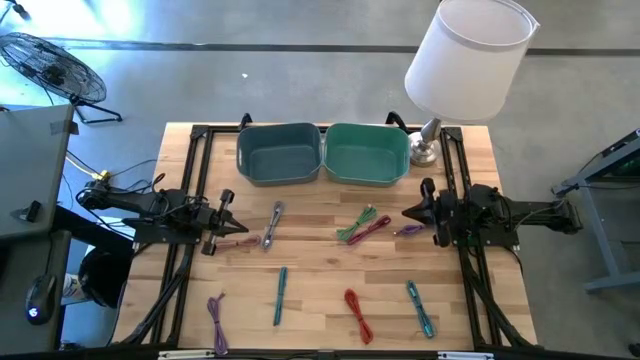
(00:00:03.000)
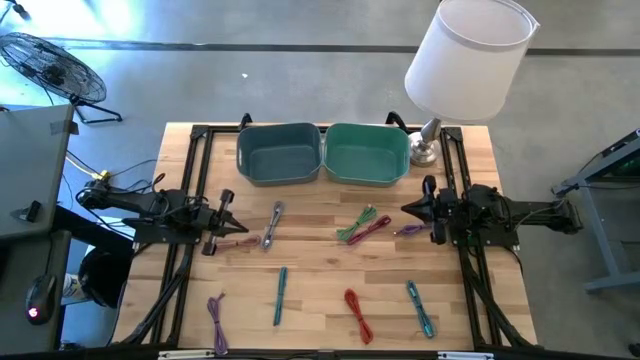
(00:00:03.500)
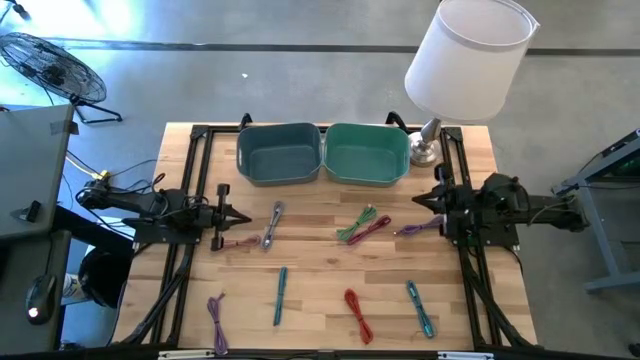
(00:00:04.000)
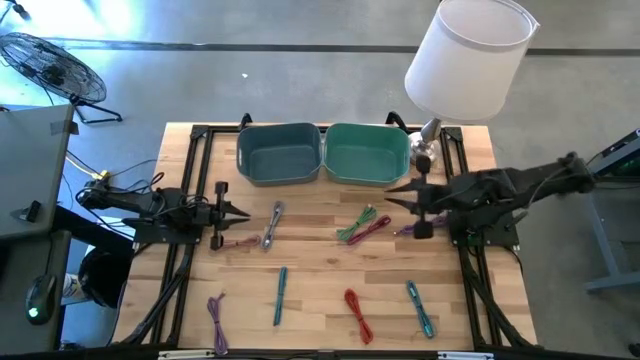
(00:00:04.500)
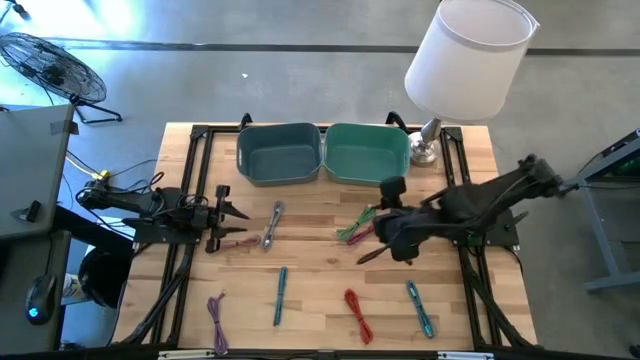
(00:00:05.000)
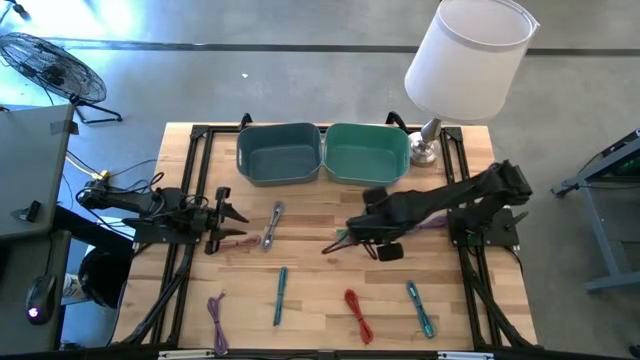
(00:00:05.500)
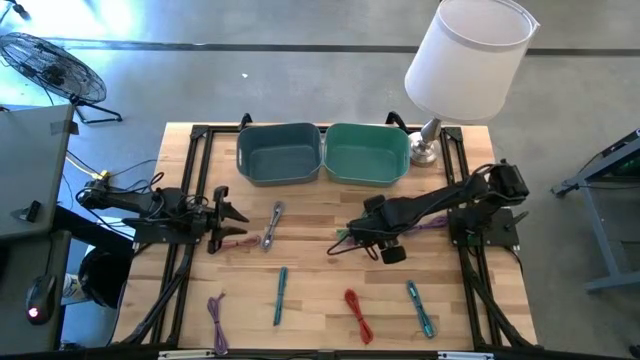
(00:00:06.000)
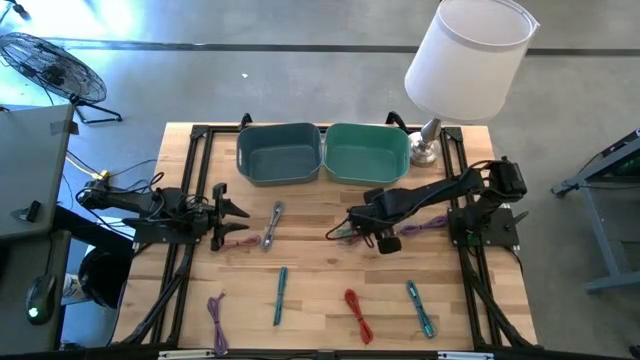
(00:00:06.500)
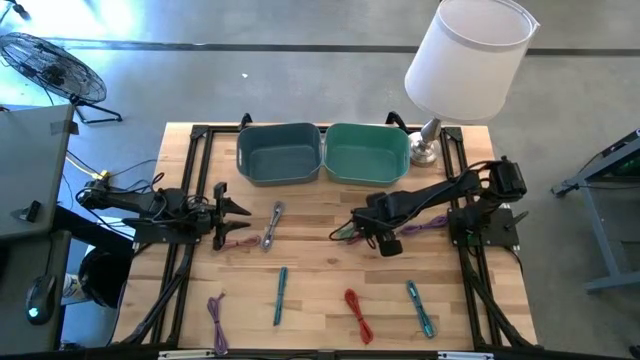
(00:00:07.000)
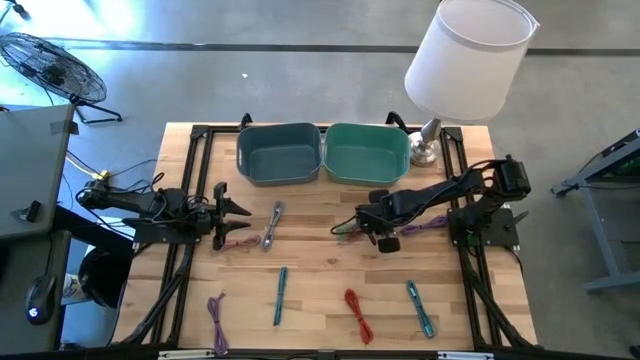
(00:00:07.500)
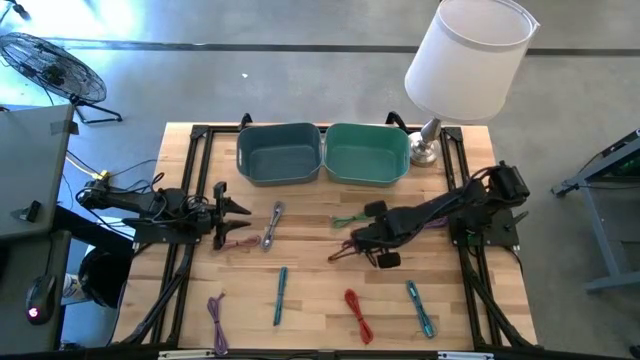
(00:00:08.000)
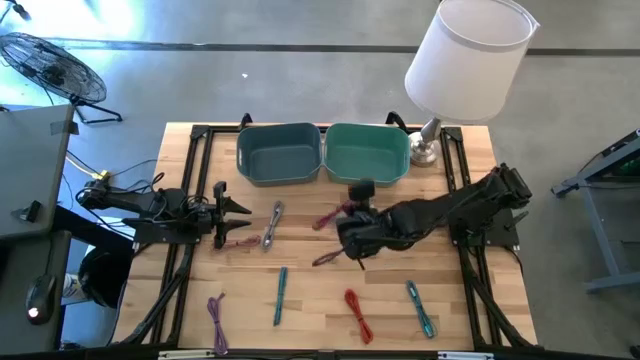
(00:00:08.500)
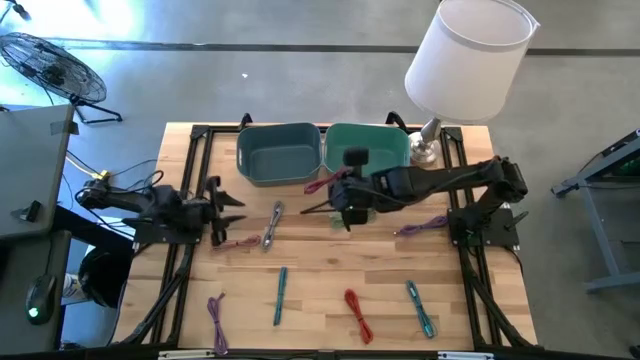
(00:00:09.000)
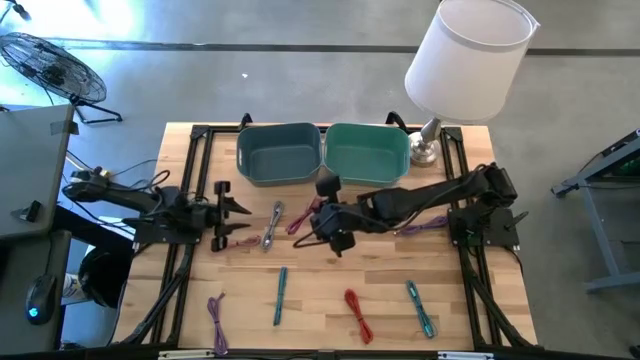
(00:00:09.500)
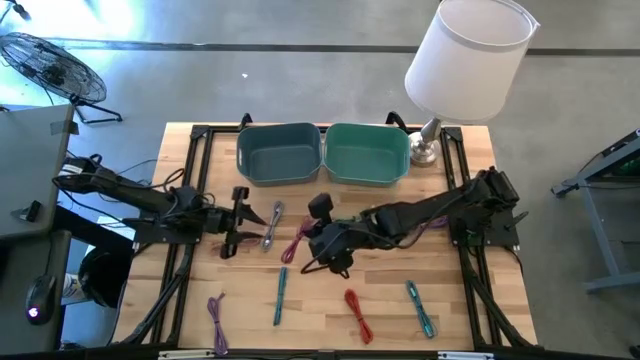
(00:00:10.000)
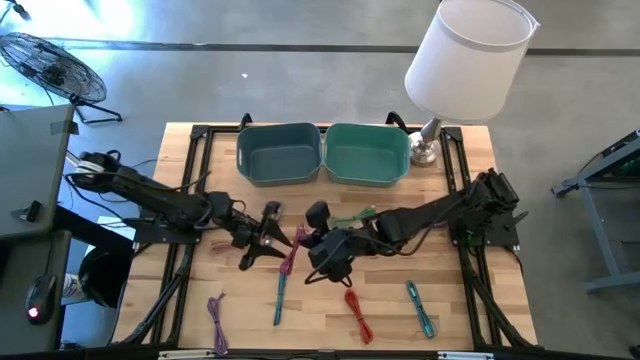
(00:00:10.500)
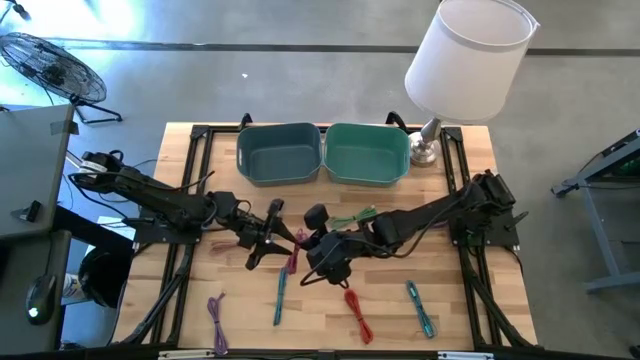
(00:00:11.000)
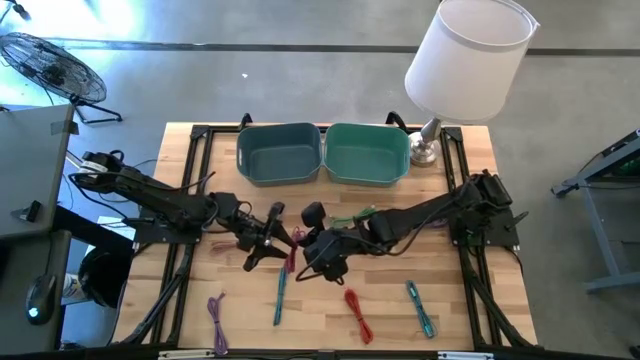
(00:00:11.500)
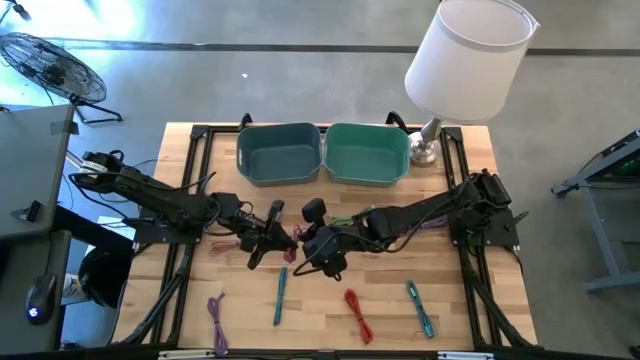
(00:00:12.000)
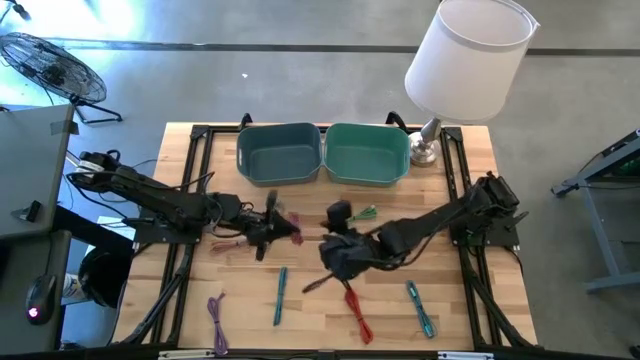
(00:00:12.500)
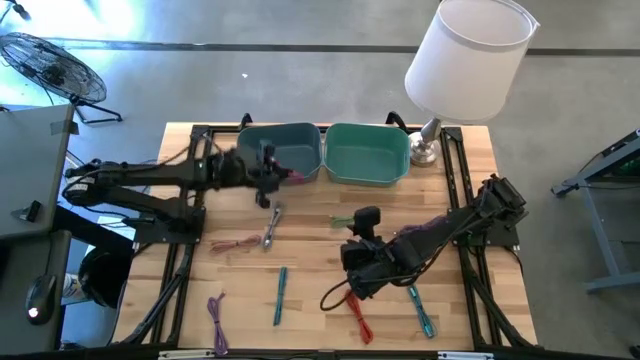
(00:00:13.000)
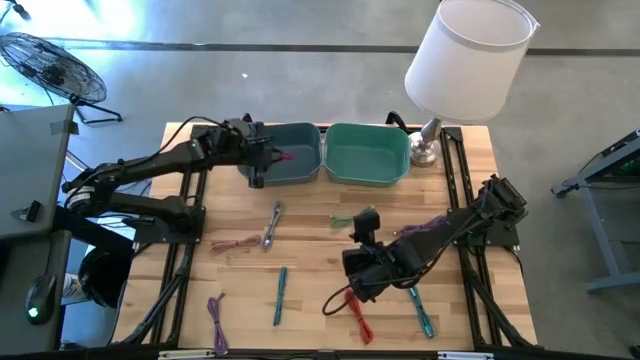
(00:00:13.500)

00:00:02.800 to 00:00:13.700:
Task: Pick & Place USB Port
Put the pink patterned USB cable into the blue bin

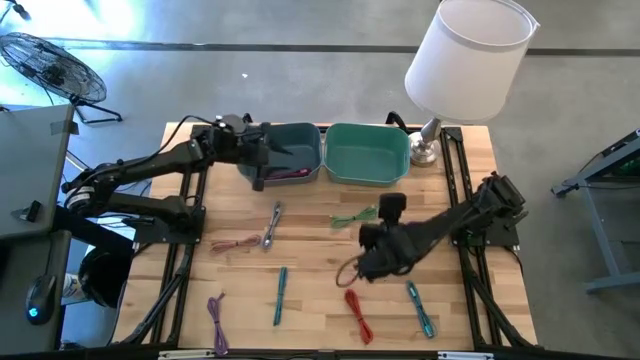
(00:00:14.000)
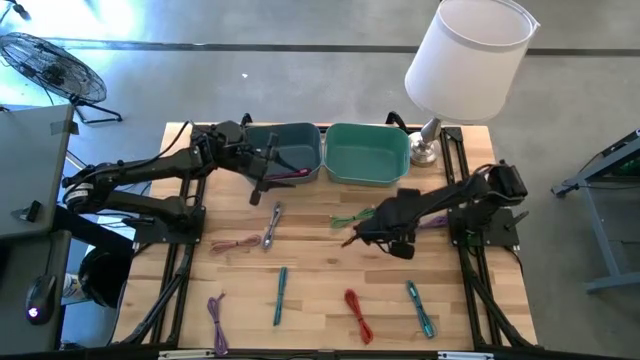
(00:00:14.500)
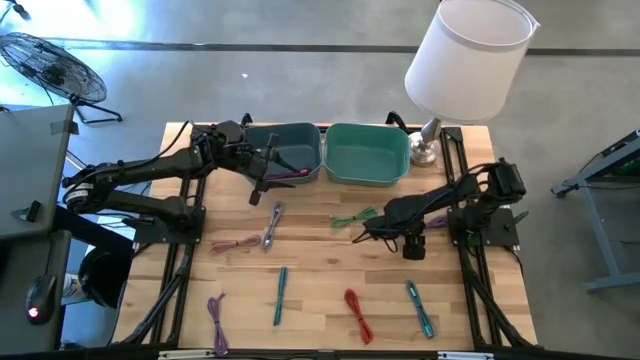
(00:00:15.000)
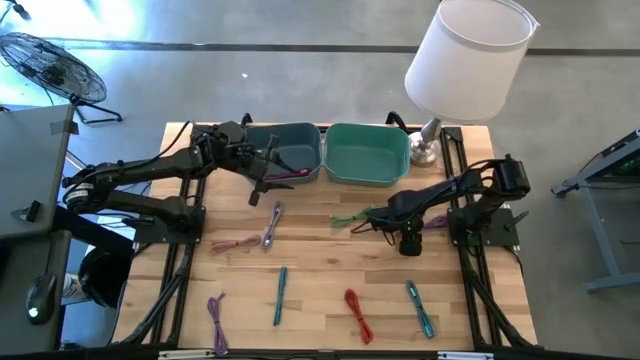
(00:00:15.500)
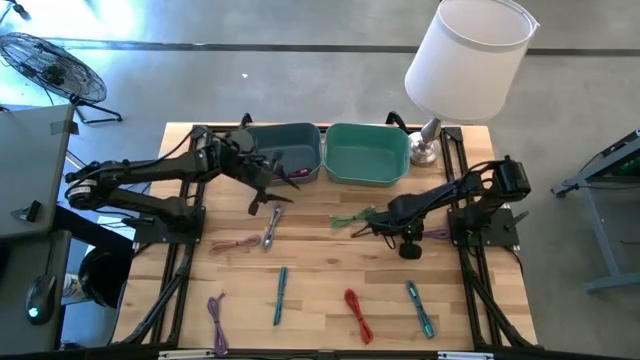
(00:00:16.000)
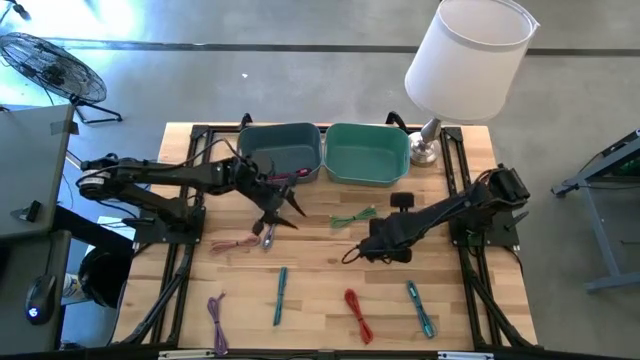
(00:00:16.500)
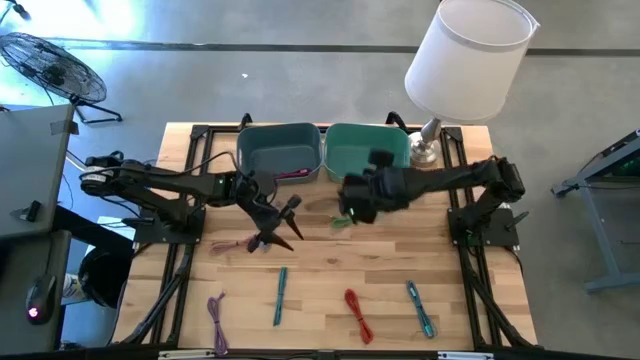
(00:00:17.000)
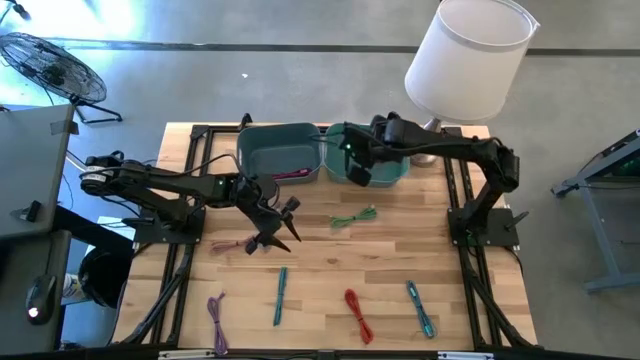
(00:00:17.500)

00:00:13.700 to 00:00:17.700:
Put the right purple USB cable into the green bin

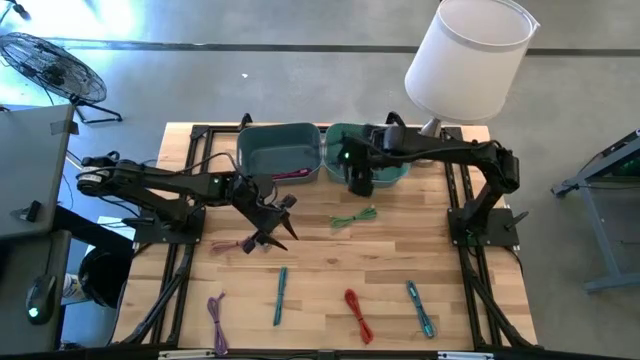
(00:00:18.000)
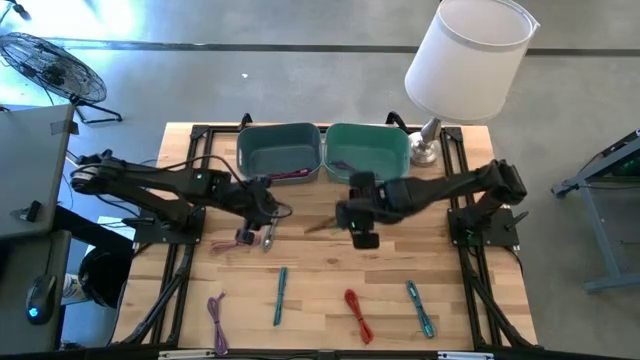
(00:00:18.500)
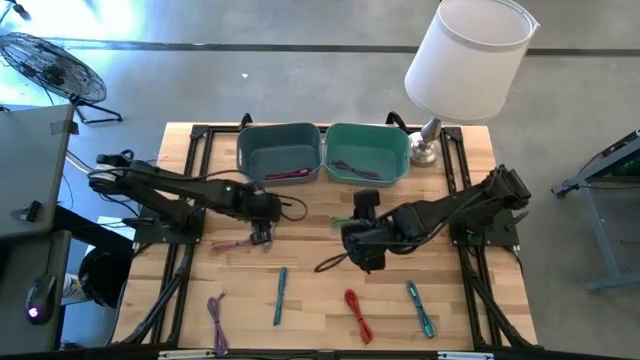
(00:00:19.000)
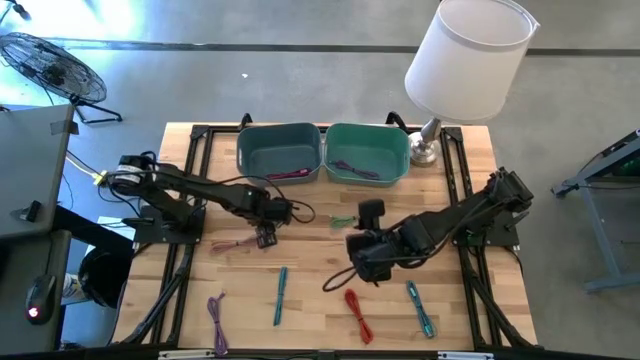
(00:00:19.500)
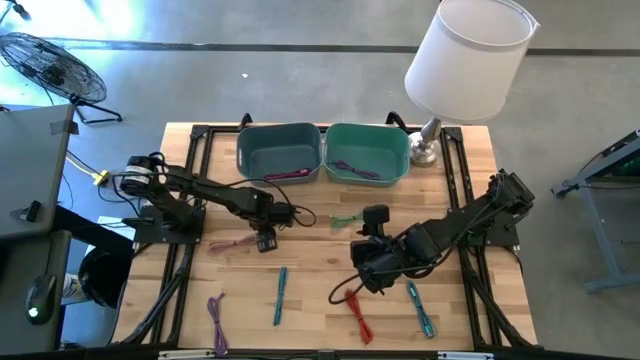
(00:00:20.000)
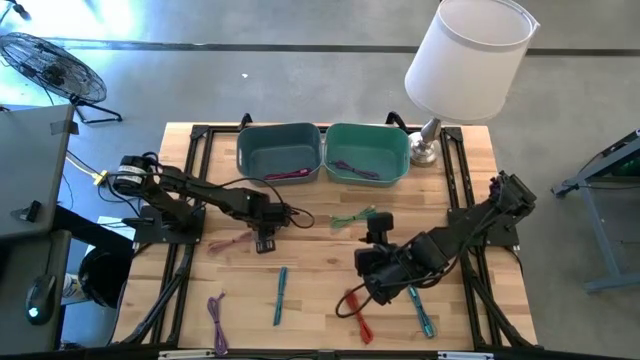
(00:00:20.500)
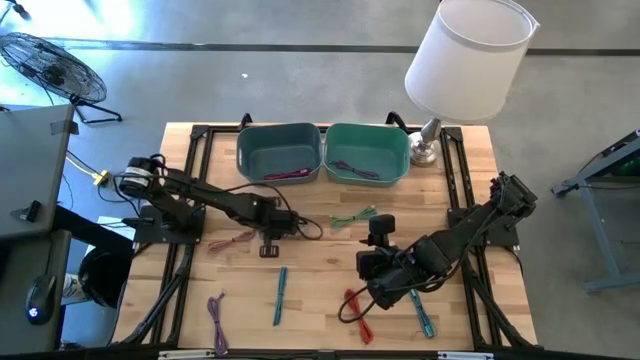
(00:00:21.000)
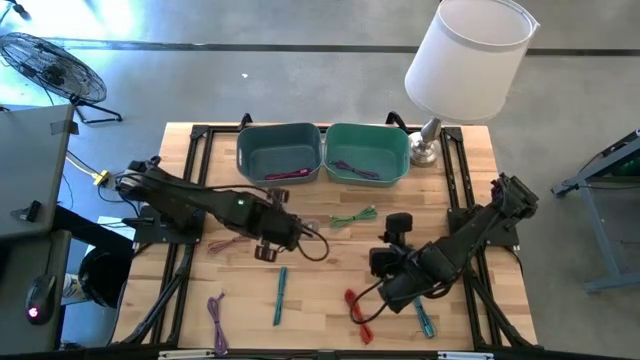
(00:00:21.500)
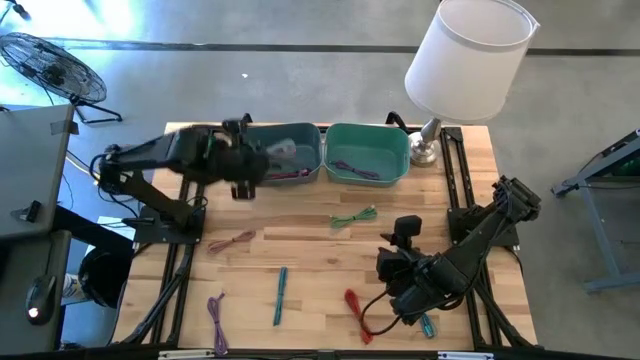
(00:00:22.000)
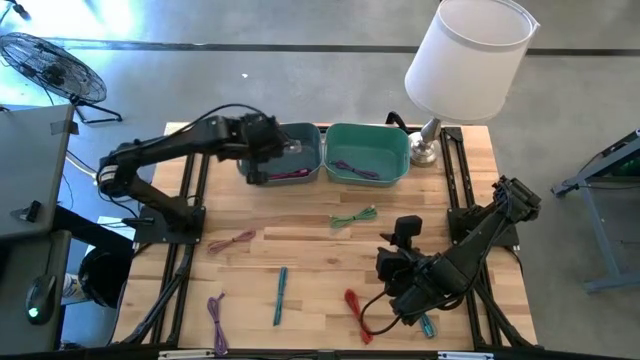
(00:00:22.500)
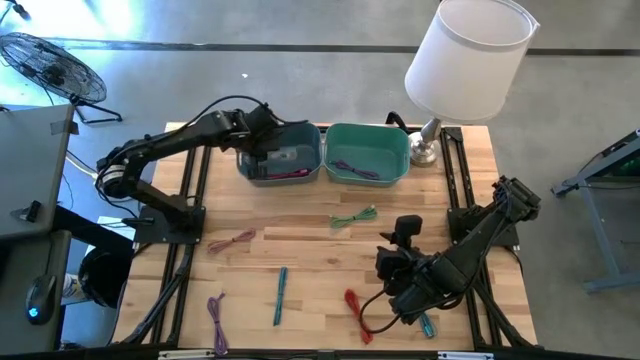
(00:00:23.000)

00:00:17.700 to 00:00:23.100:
Put the white patterned USB cable into the blue bin
